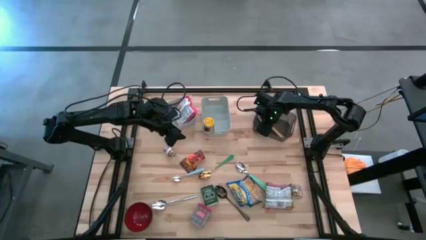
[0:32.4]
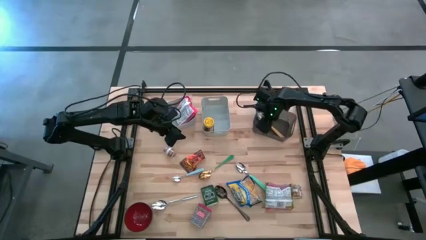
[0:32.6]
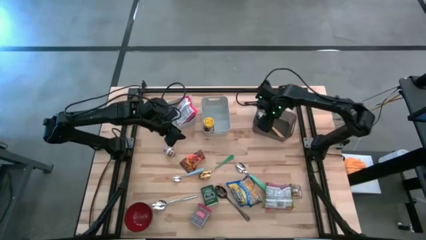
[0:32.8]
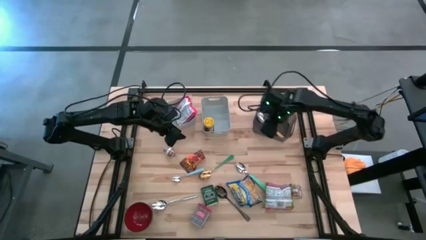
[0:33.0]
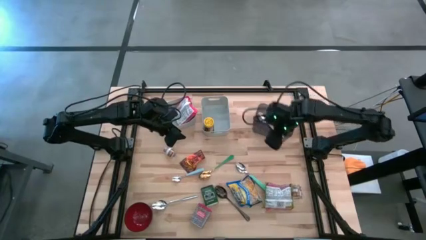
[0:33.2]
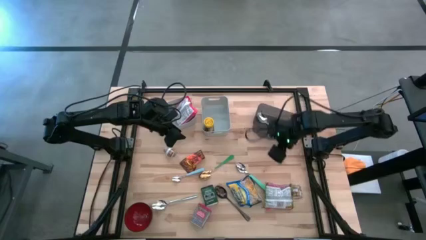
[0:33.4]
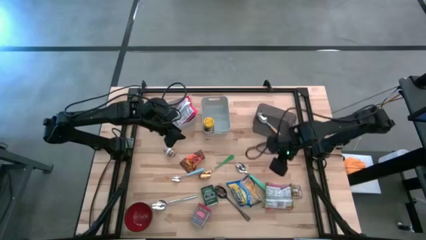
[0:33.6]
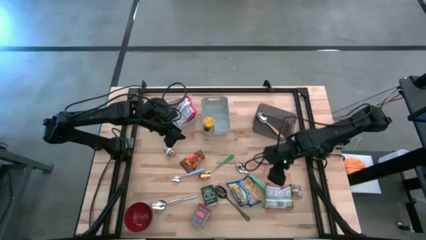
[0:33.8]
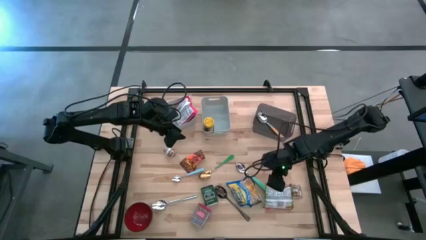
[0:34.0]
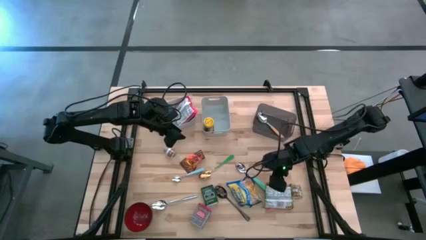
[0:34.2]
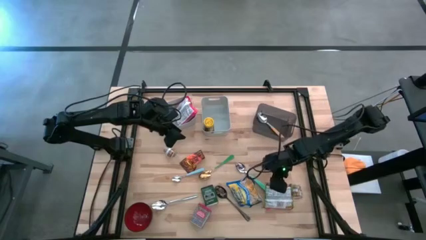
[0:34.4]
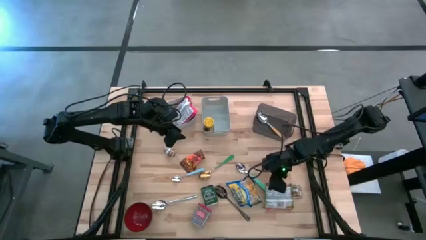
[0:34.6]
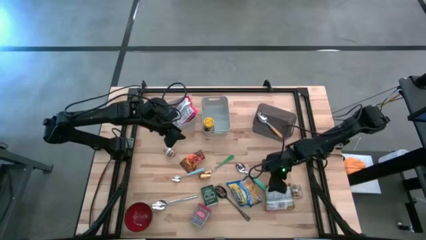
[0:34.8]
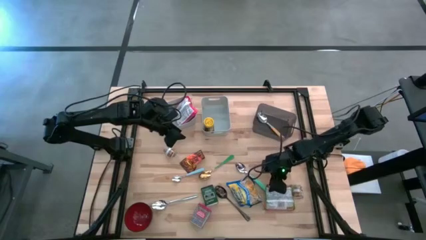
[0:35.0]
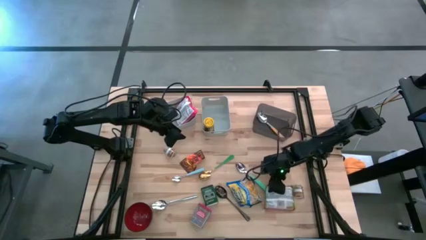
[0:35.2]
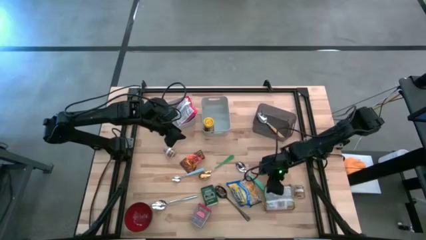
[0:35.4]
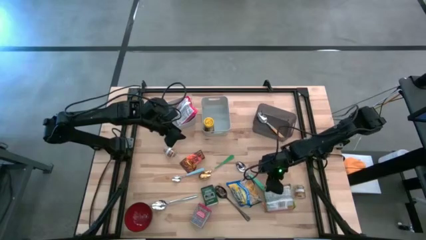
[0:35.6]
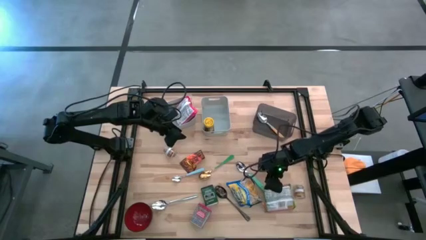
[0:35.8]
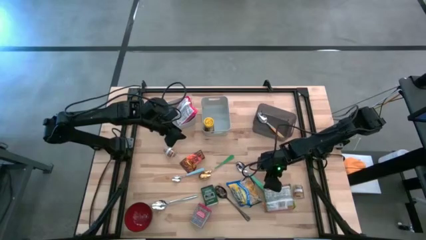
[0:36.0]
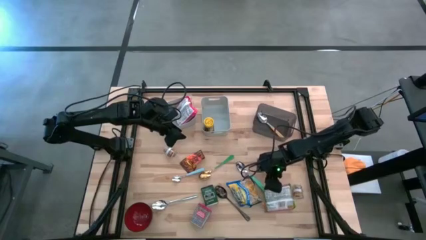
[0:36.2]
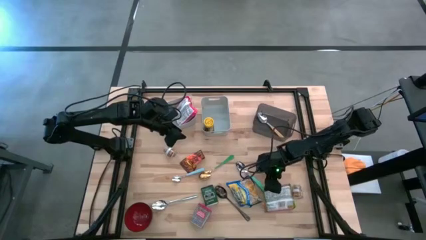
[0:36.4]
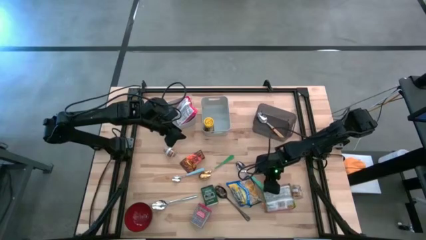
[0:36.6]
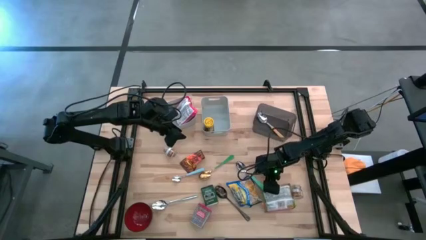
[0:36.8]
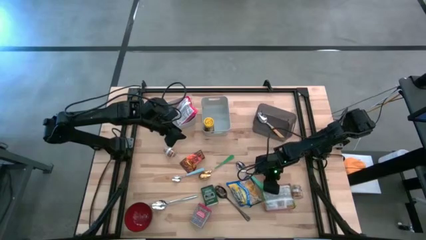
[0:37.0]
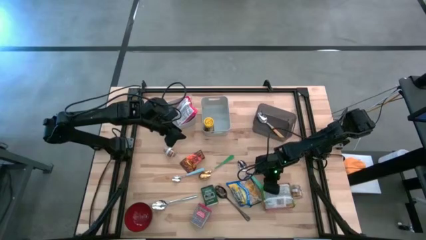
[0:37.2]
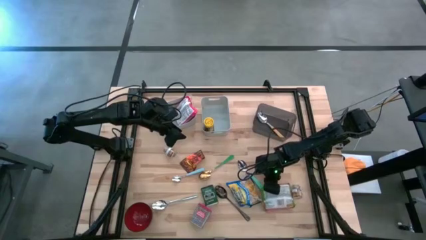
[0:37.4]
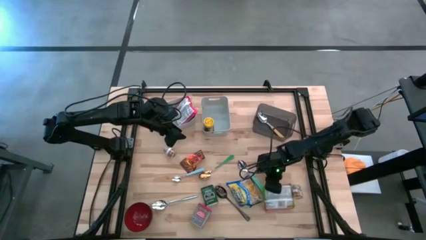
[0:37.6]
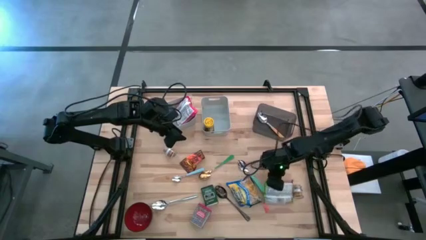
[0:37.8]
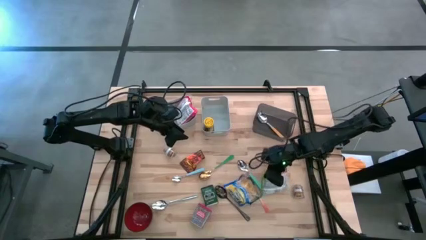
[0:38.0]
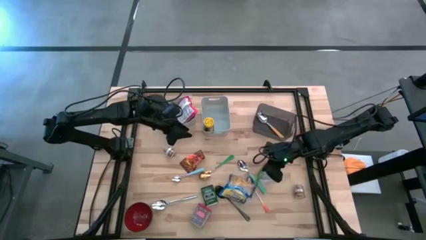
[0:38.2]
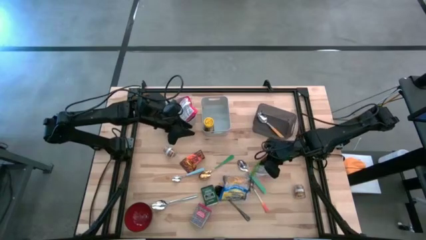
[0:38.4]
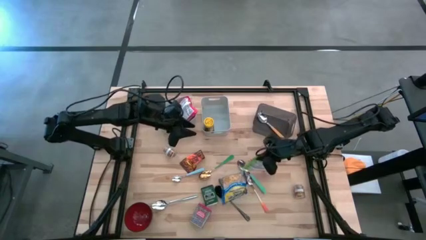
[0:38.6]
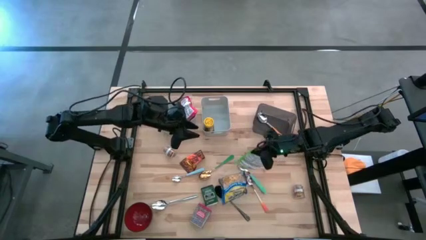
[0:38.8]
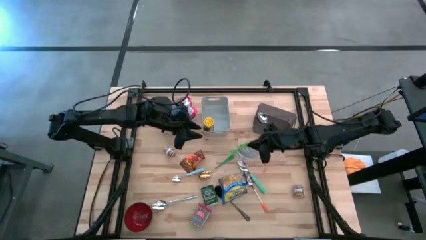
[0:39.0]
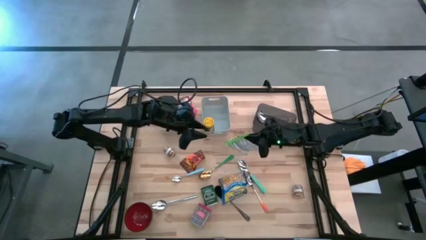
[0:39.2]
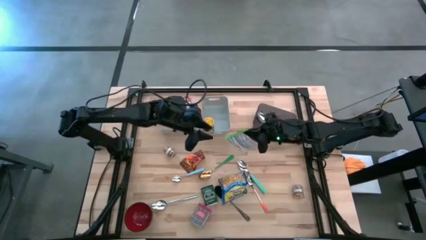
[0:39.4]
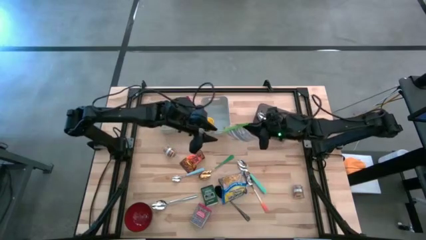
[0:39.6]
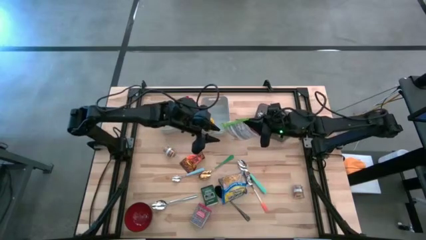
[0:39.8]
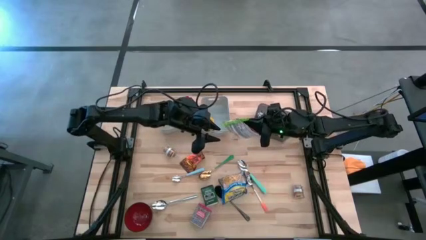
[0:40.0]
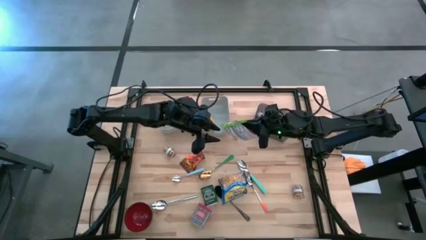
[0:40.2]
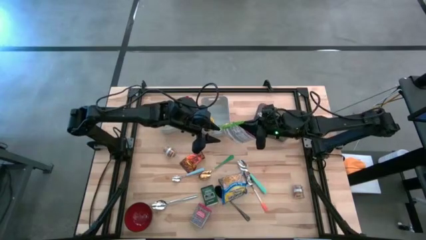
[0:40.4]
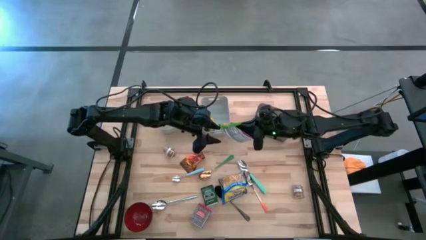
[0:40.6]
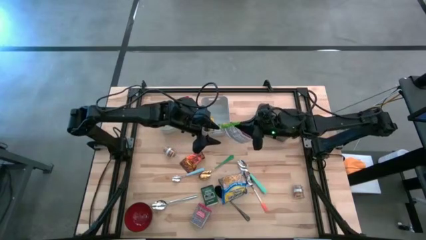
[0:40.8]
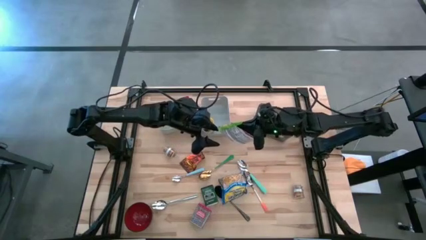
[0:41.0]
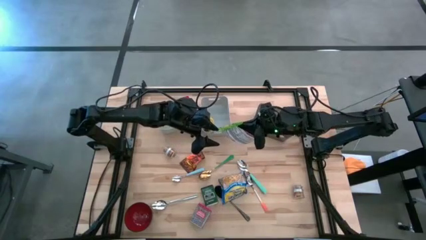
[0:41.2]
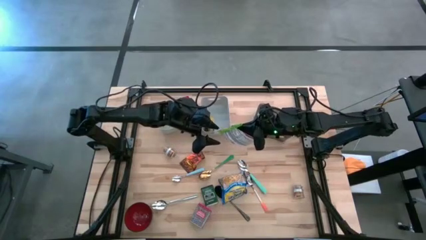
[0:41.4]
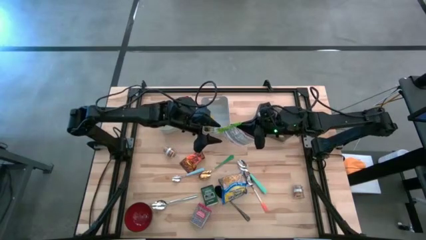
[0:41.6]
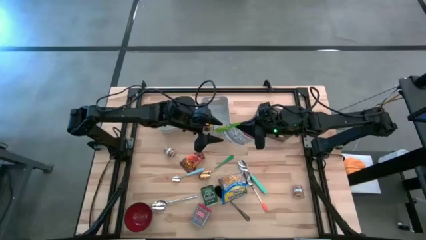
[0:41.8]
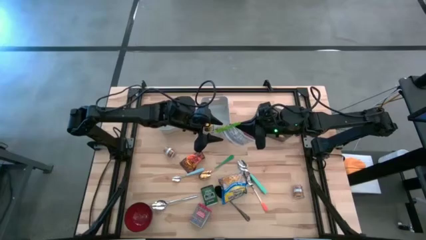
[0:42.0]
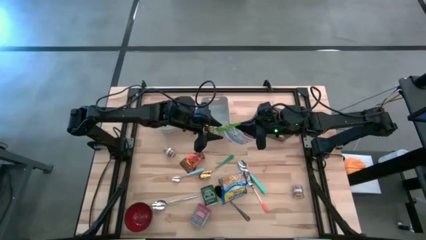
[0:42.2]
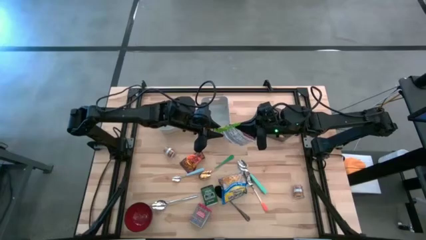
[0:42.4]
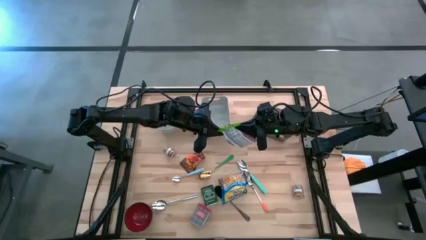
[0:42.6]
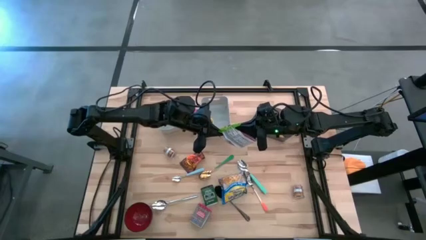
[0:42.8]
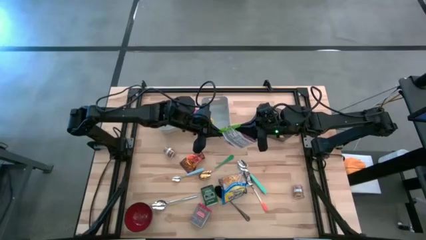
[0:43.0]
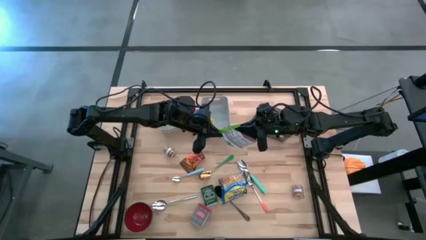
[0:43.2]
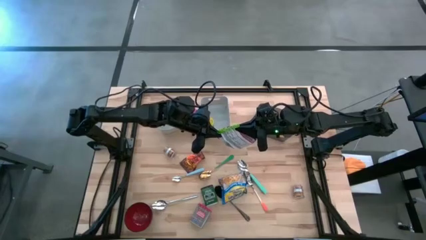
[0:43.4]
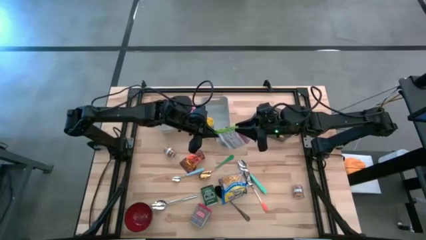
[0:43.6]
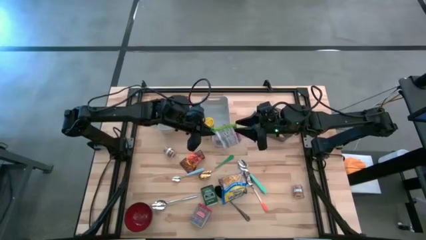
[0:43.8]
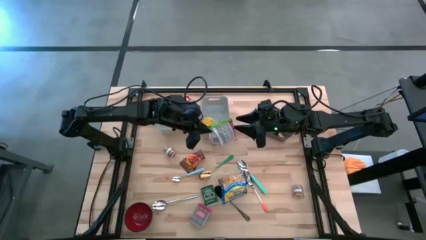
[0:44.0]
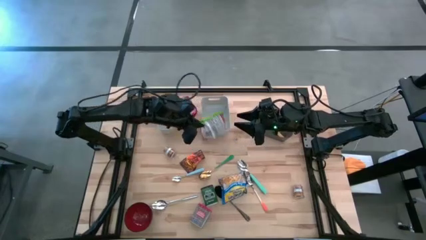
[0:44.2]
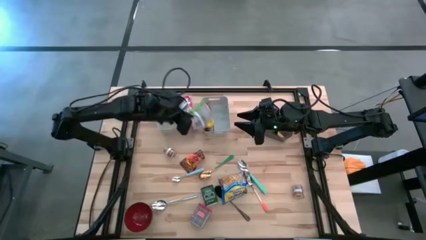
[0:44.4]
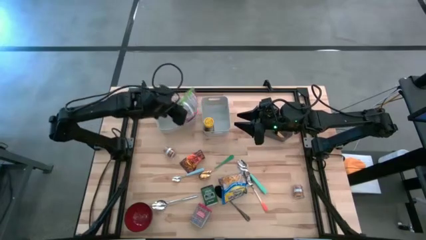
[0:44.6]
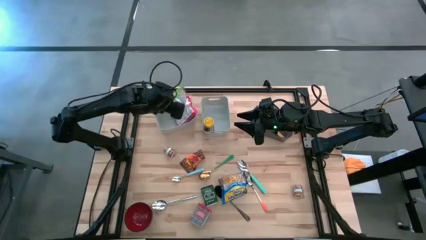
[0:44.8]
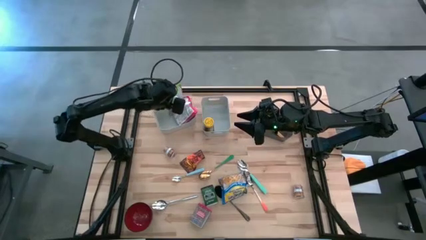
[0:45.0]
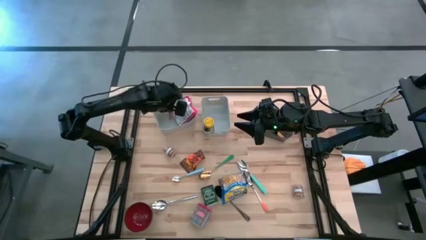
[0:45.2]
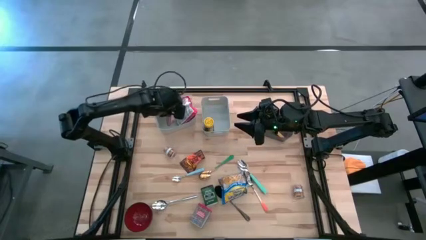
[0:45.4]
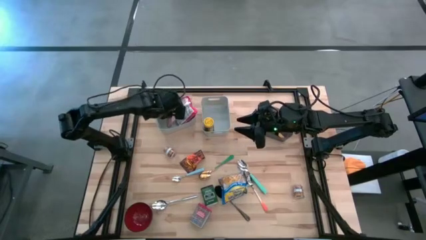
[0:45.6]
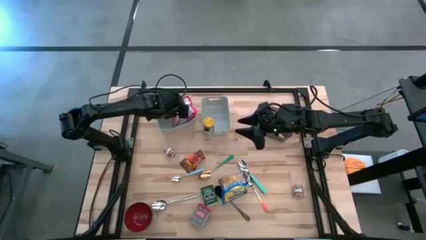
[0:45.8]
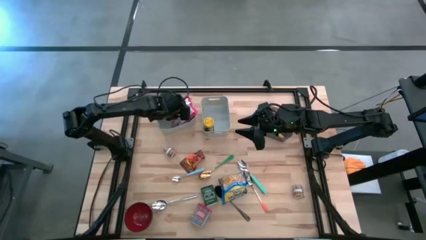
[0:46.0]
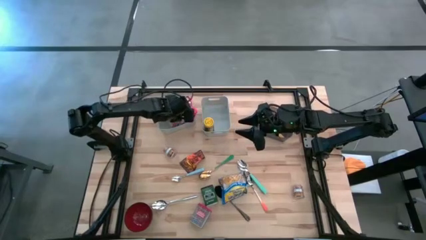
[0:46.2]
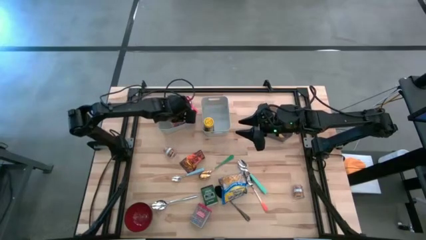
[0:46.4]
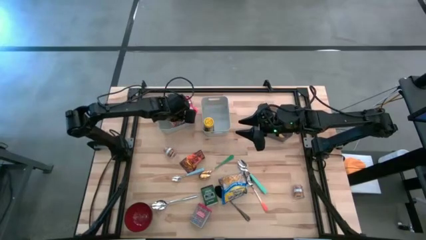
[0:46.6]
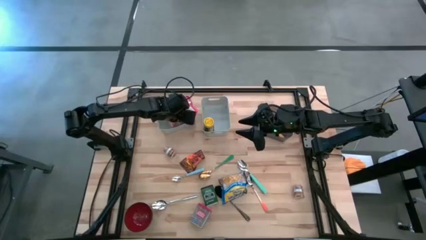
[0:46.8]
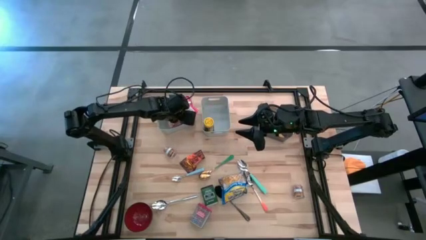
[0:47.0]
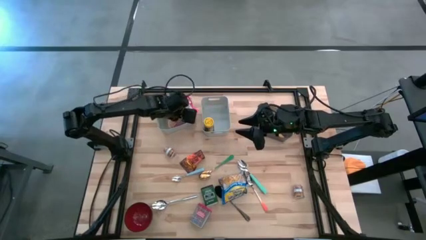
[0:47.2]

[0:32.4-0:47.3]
Put the green noodle pack into the left gray bin
